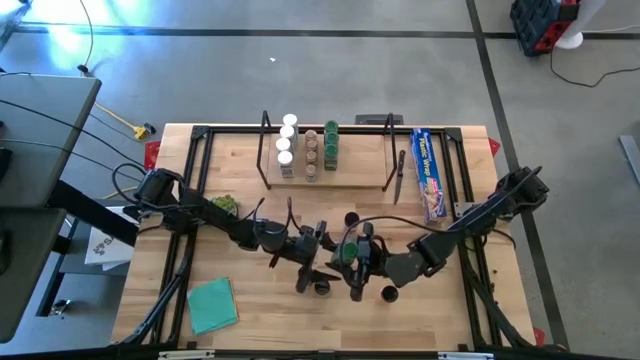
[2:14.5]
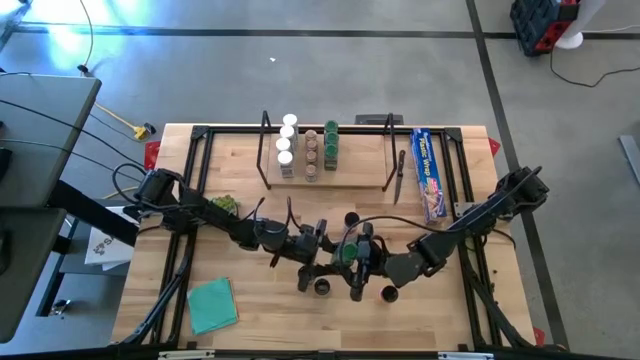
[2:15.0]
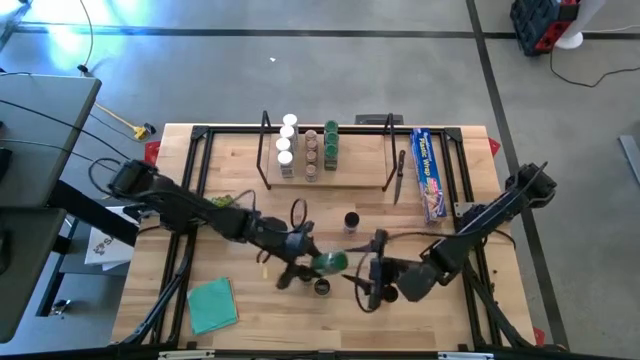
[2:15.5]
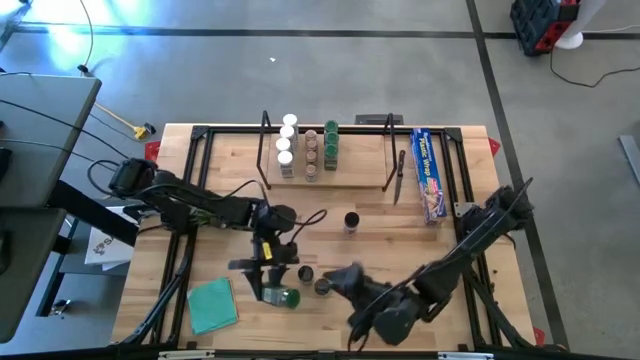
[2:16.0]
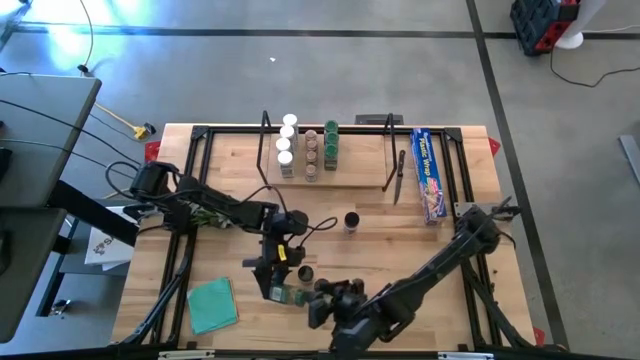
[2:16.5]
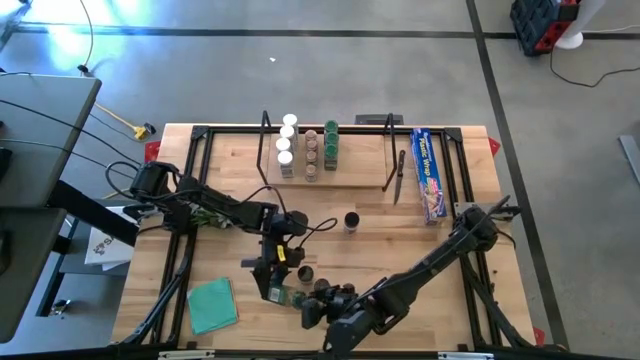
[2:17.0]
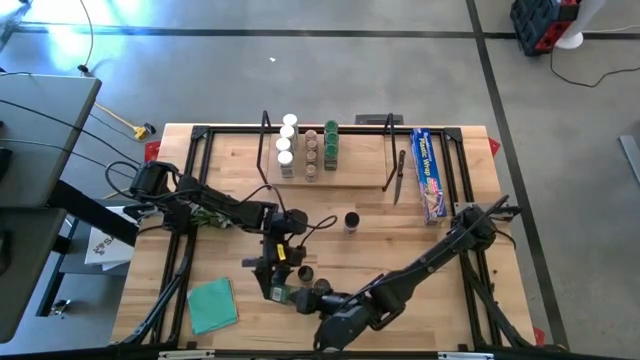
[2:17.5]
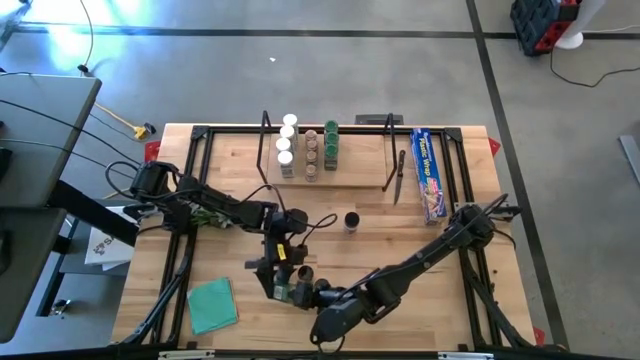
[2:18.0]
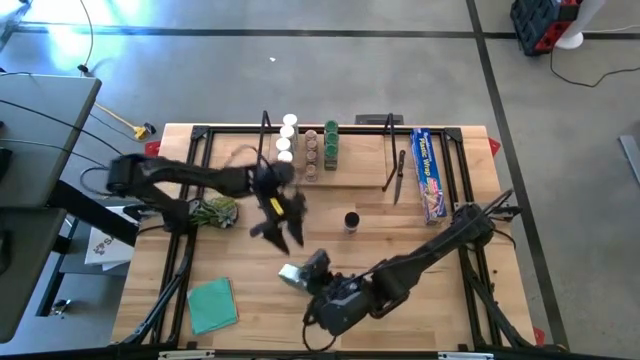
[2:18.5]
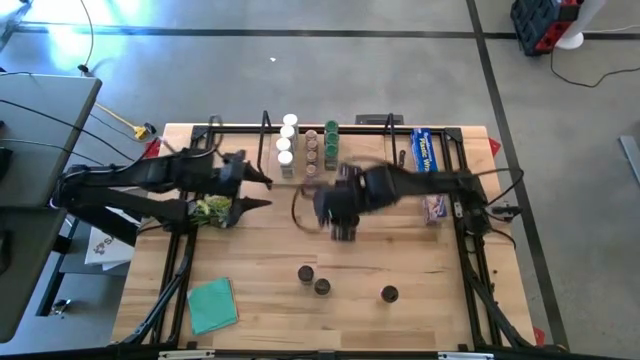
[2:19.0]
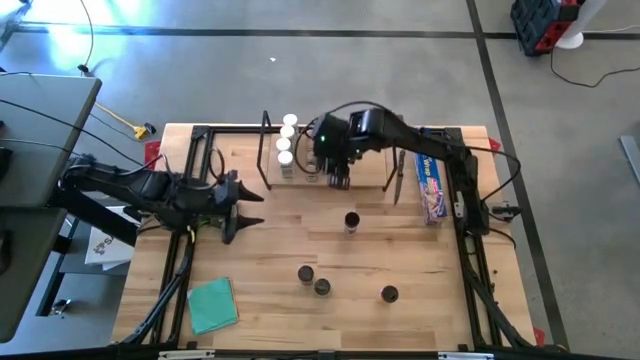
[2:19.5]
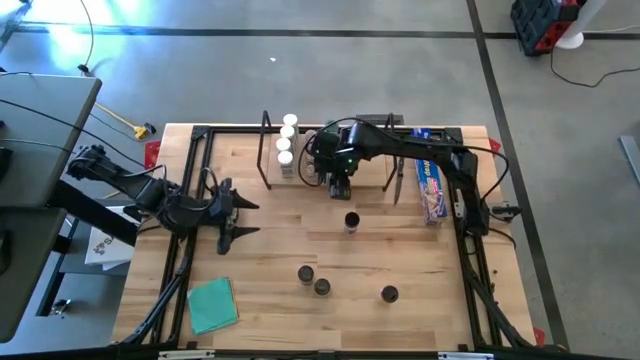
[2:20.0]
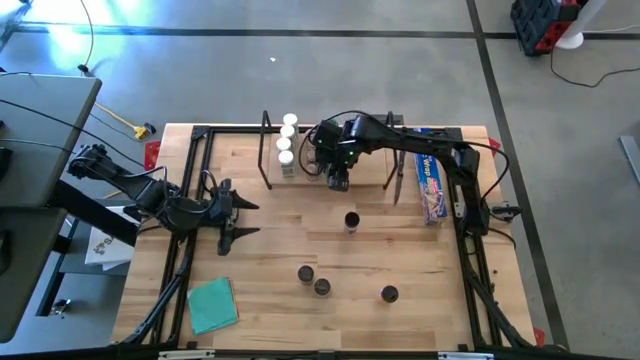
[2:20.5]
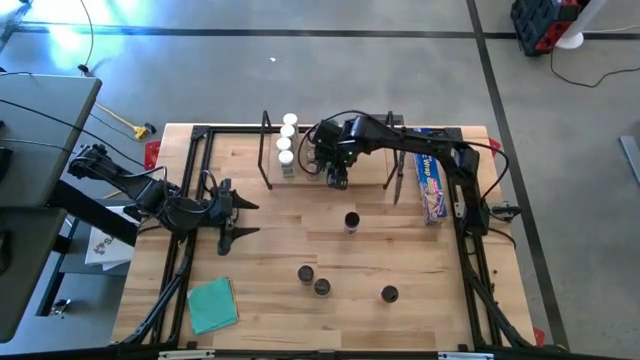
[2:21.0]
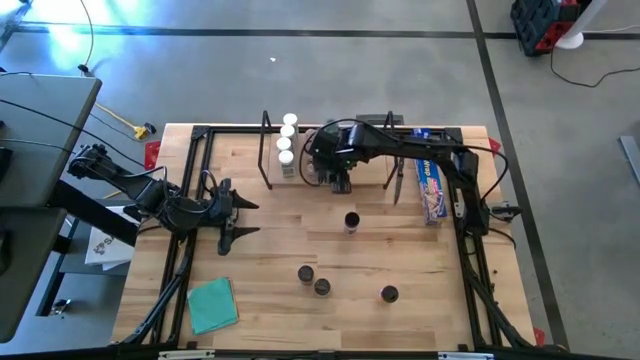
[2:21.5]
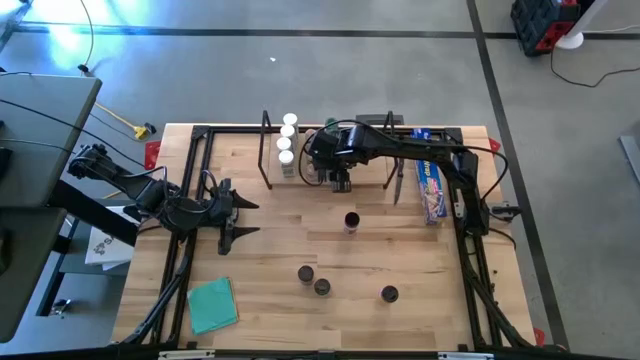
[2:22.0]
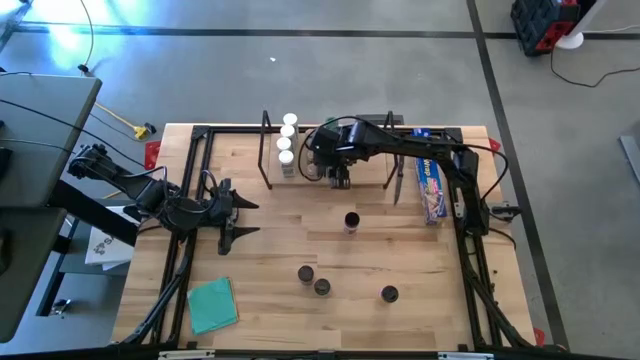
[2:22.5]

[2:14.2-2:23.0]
Task: Shelf spices
Put the green seasoning bottle on the shelf aligned with the other green seasoning bottles

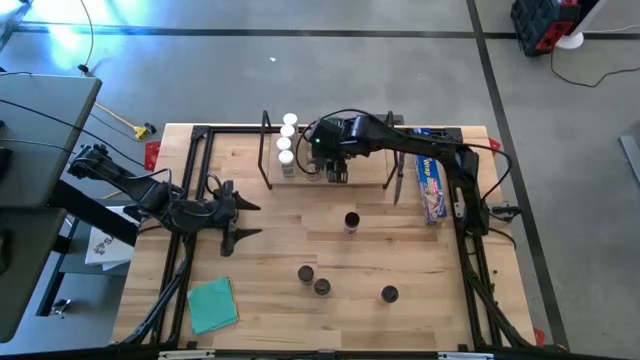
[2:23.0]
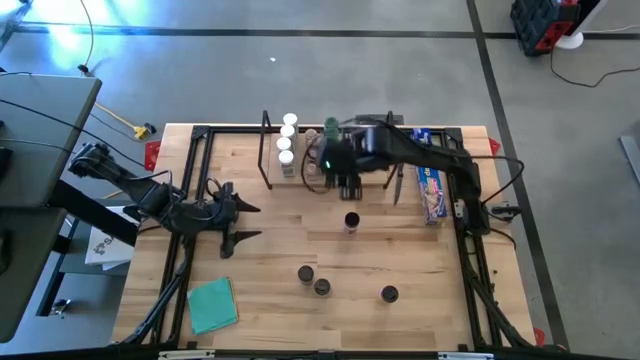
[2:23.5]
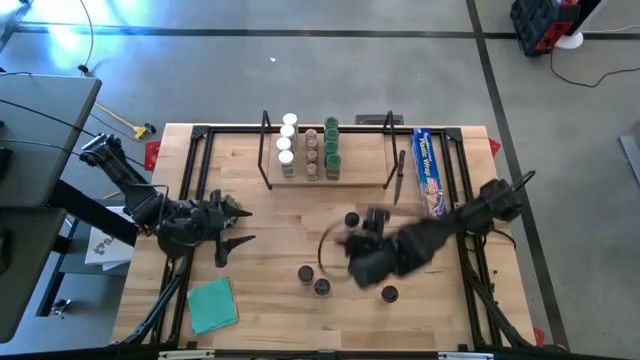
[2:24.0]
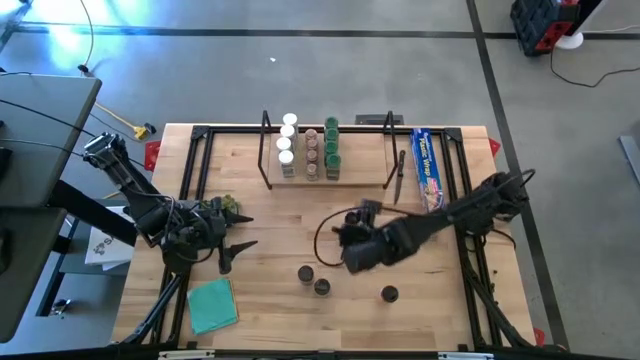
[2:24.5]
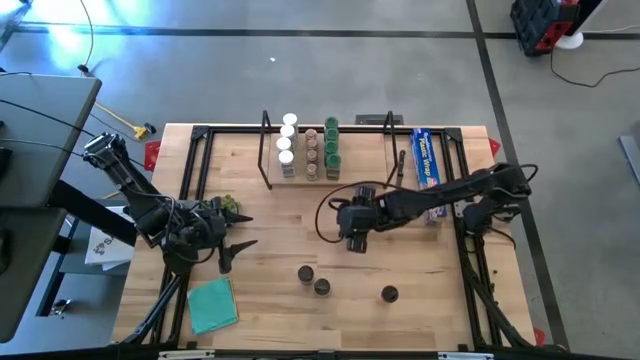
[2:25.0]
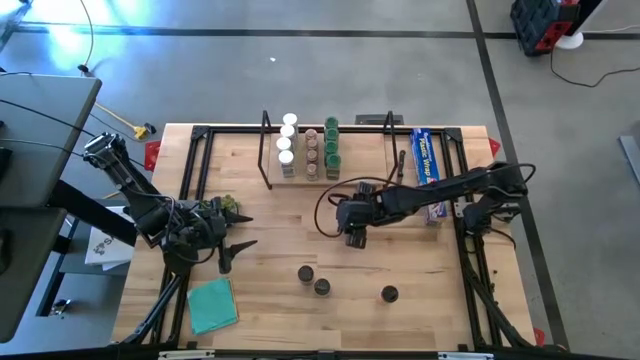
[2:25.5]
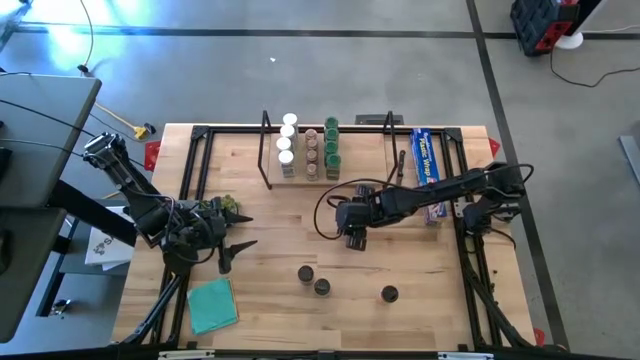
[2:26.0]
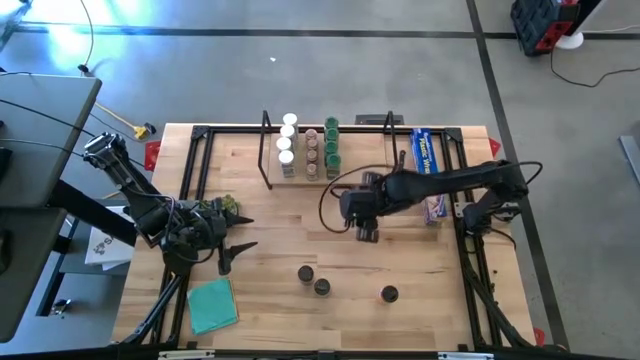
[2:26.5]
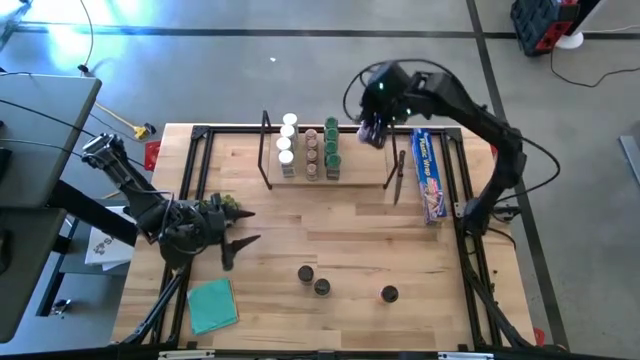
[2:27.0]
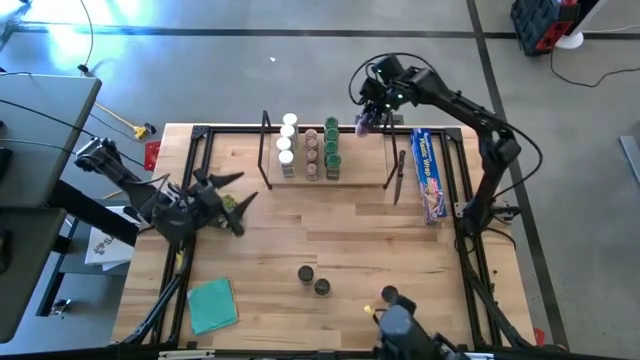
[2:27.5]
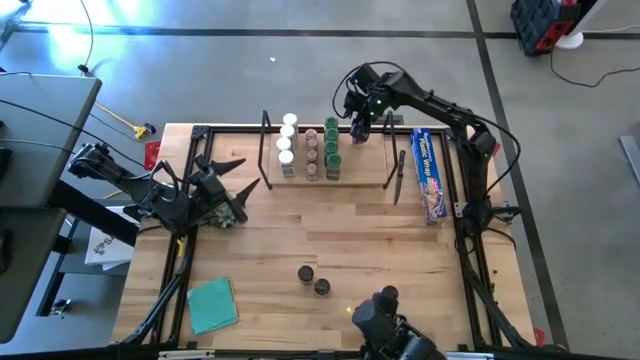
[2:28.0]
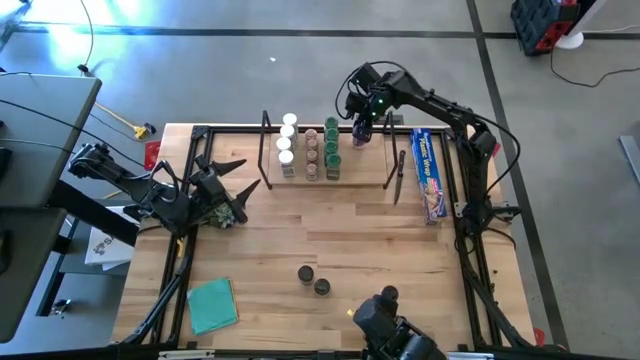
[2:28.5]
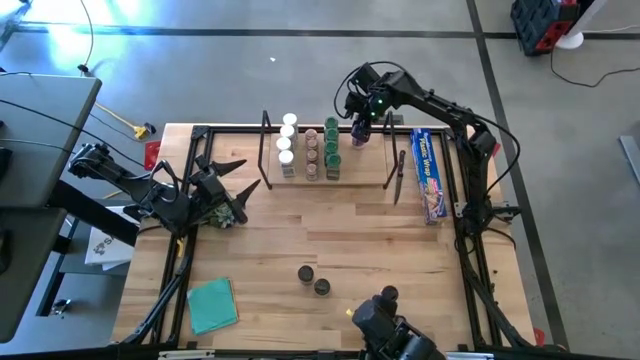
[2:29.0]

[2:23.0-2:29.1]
Put the black seasoning bottle on the shelf

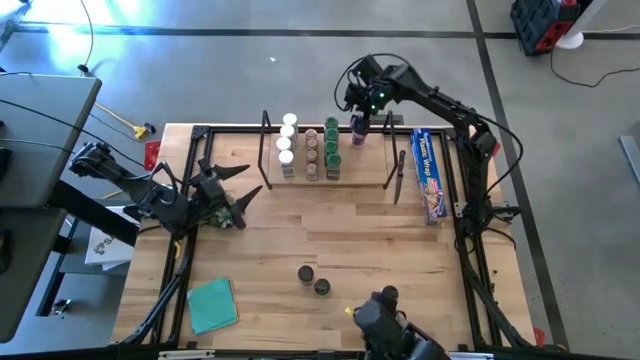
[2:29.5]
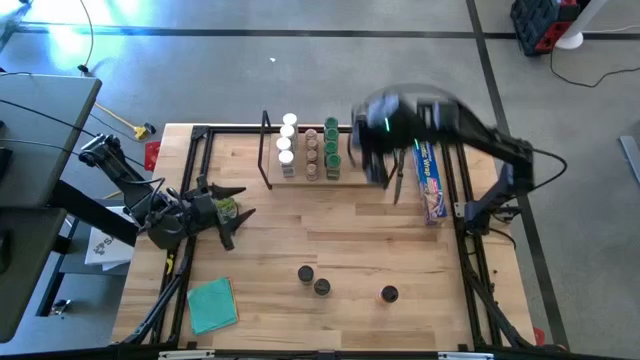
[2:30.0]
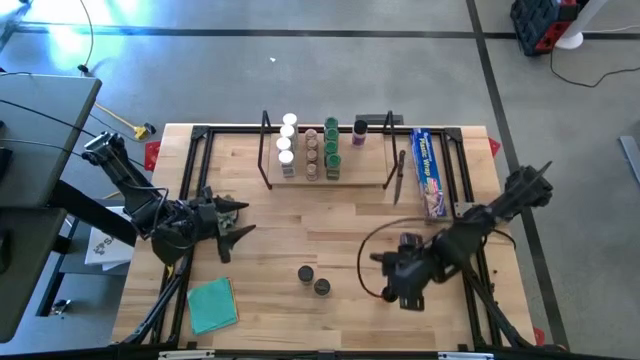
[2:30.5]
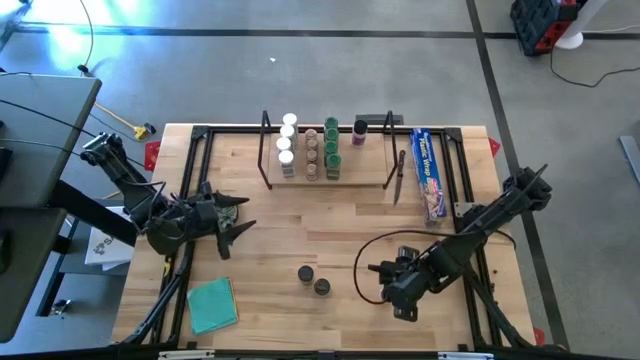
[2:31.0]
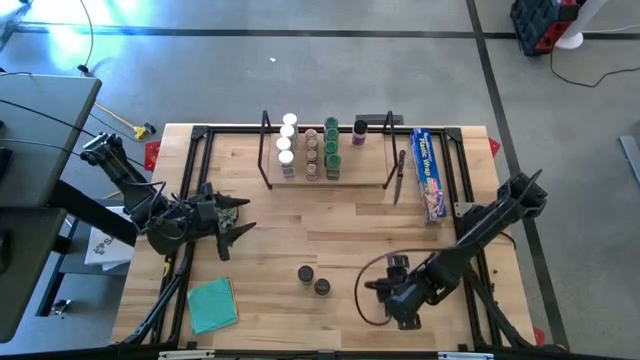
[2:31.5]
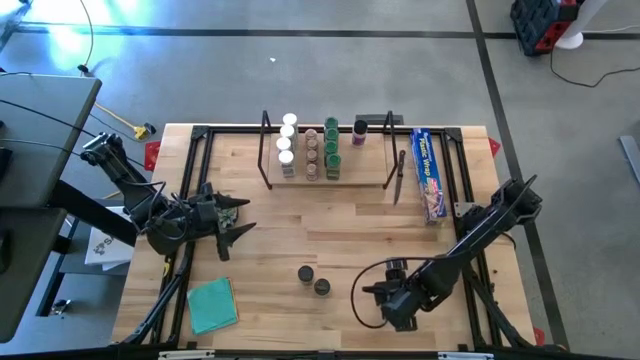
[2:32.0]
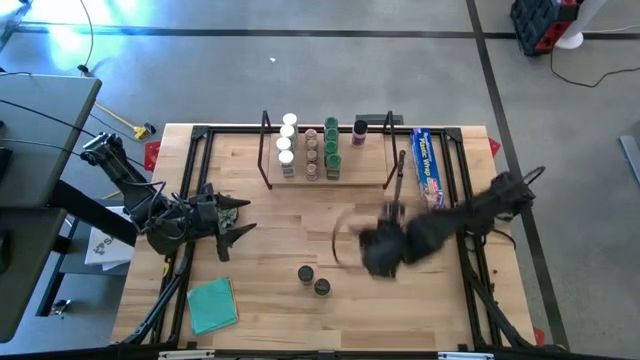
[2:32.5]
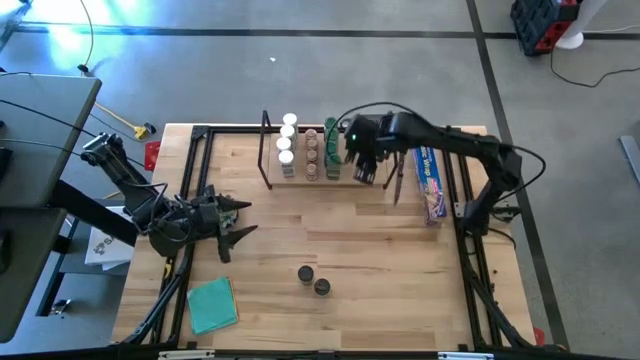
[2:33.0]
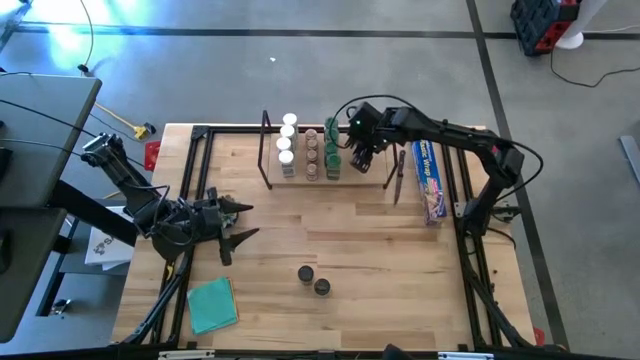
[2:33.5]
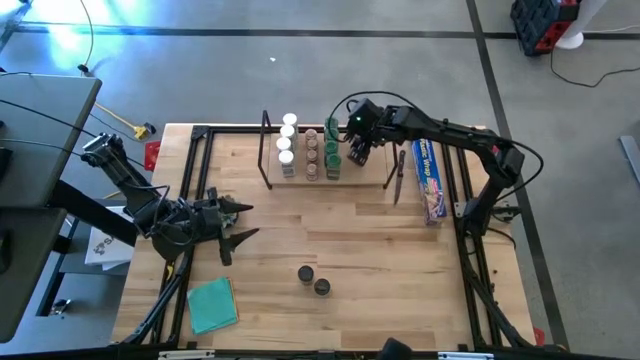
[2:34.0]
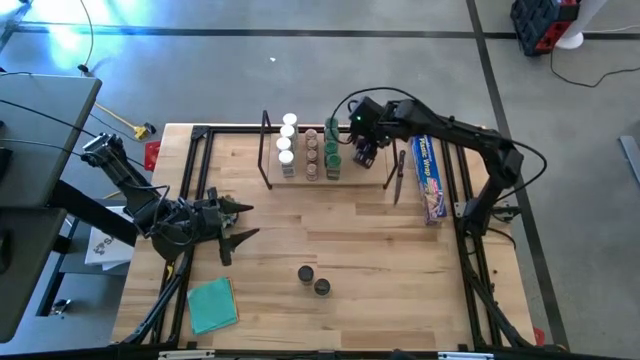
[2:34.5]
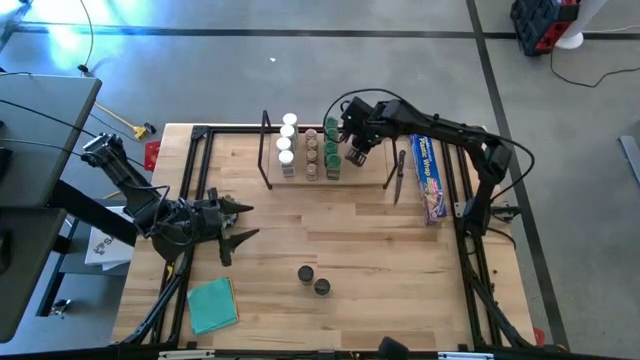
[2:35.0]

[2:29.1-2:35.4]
Put the black seasoning bottle on the shelf aligned with the other black seasoning bottle
